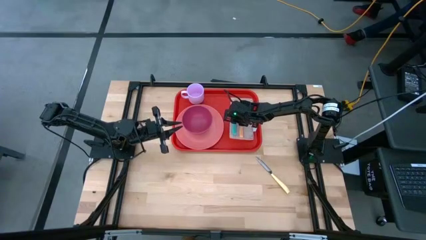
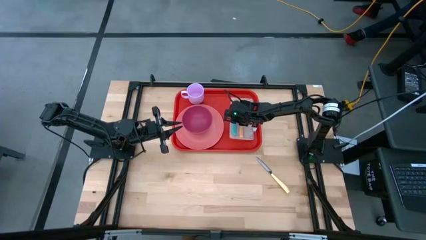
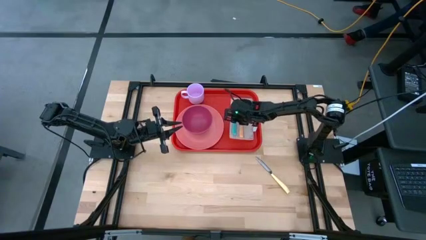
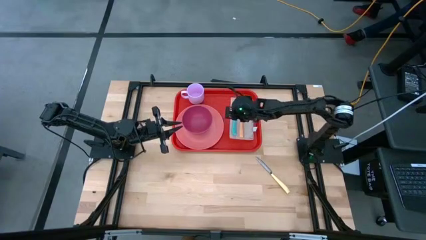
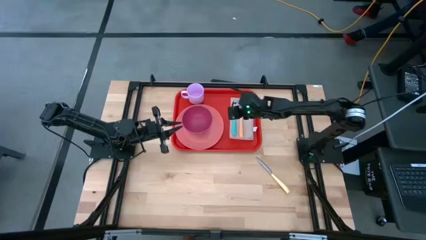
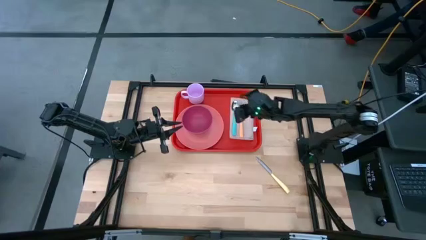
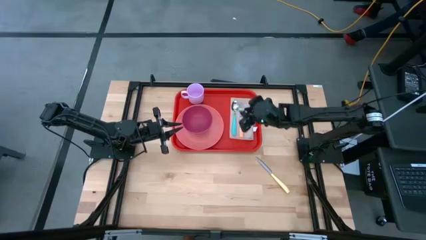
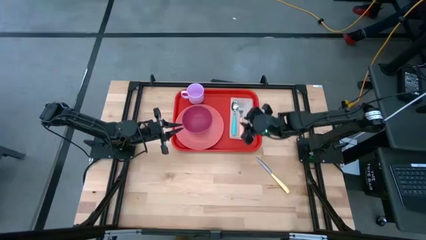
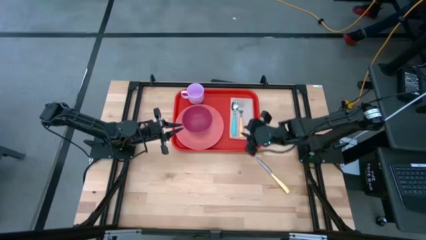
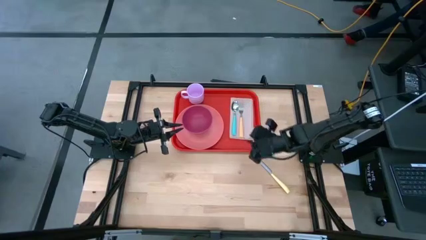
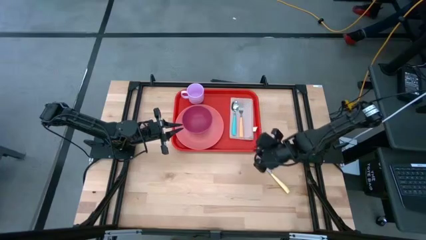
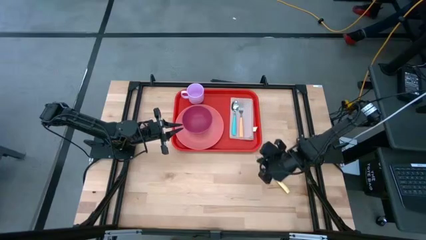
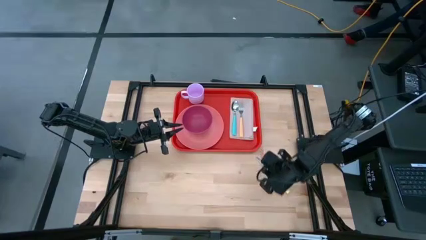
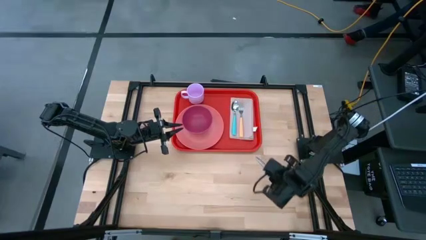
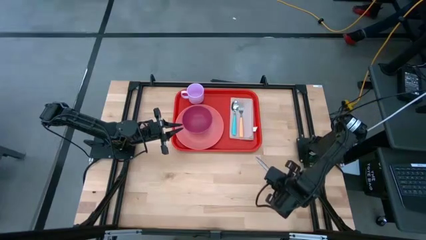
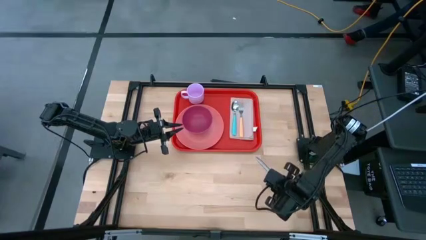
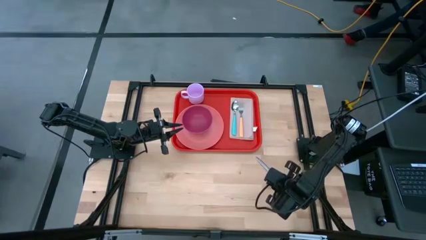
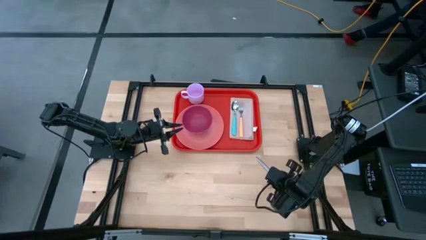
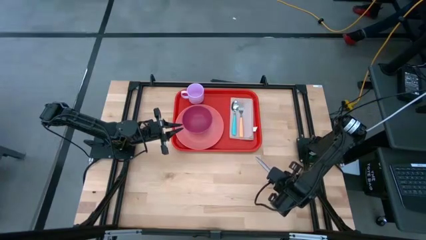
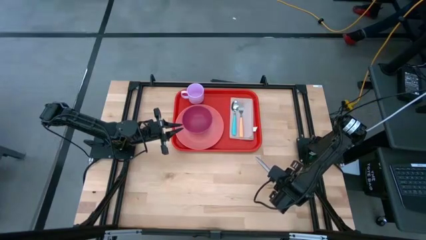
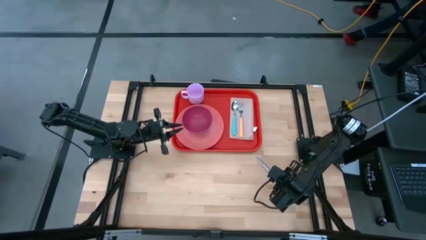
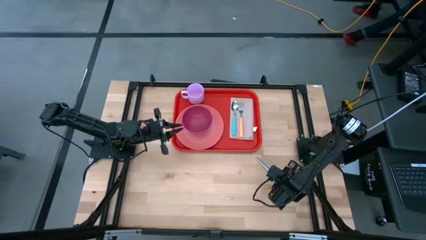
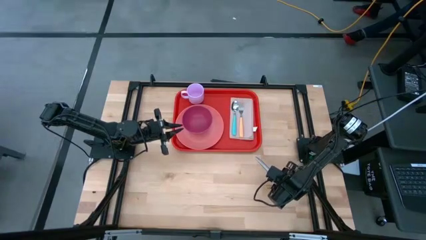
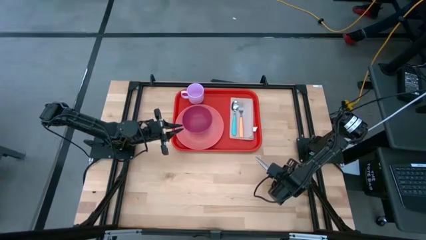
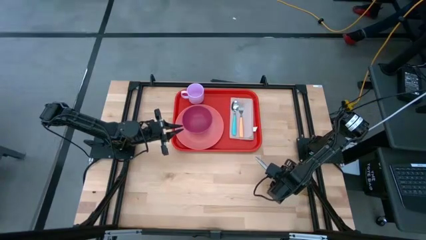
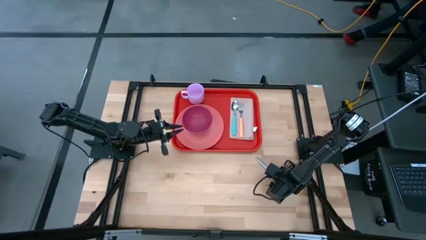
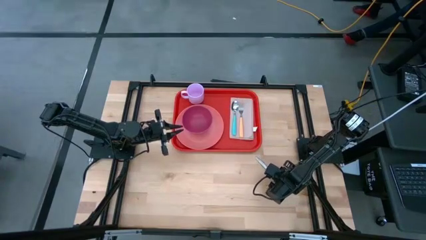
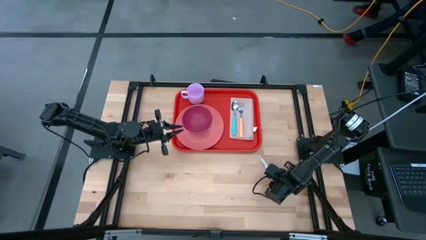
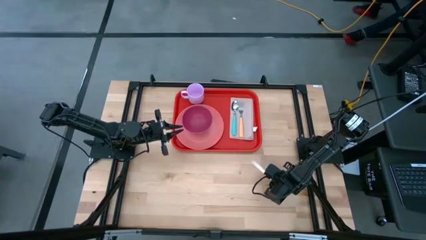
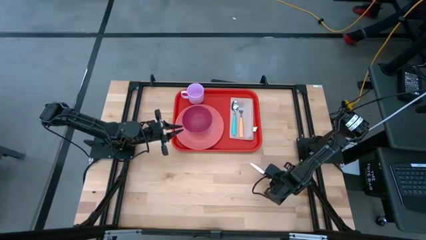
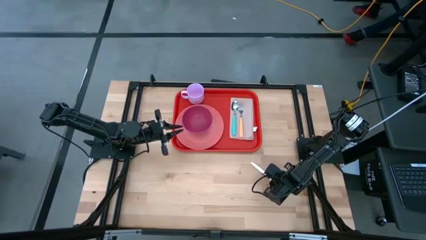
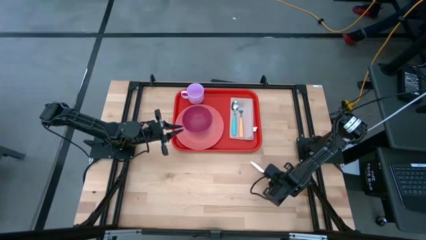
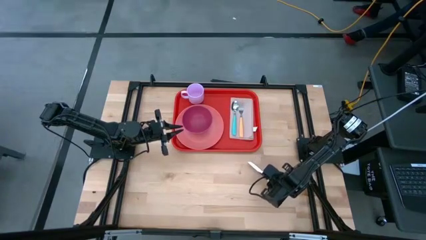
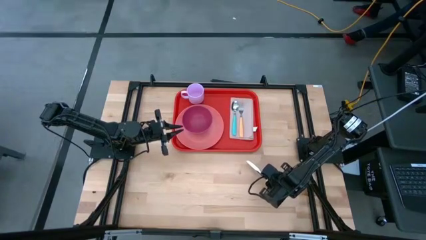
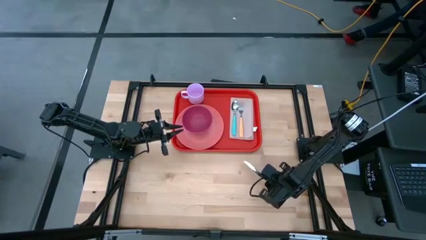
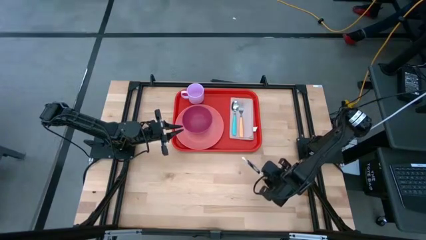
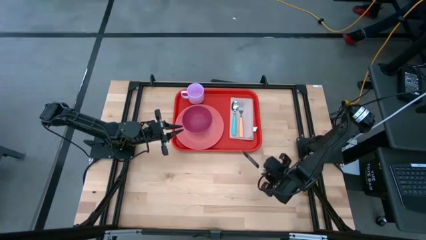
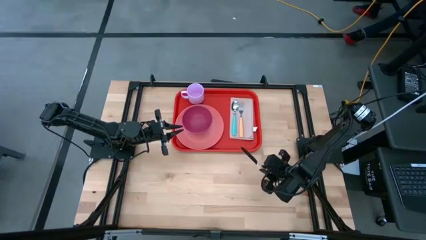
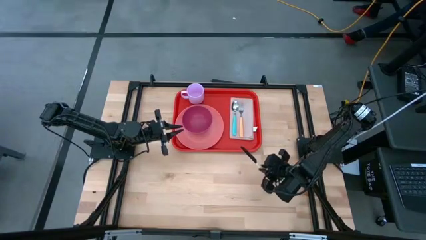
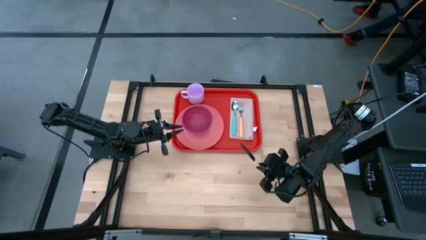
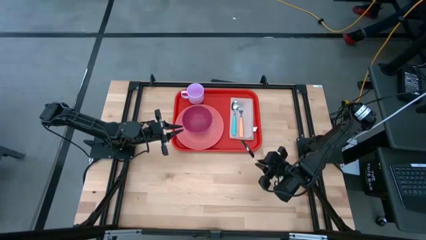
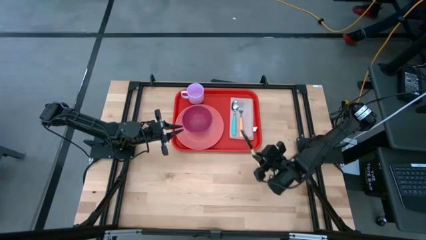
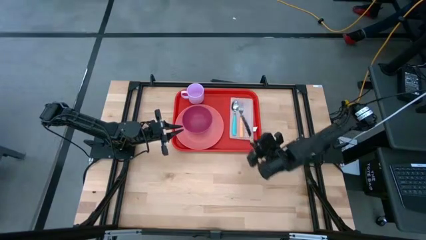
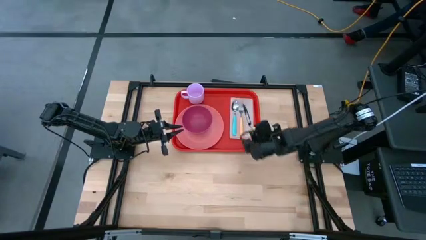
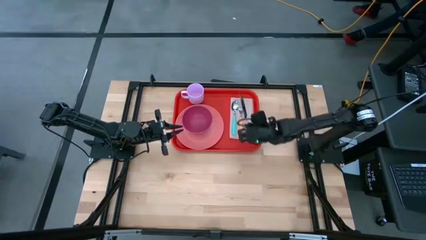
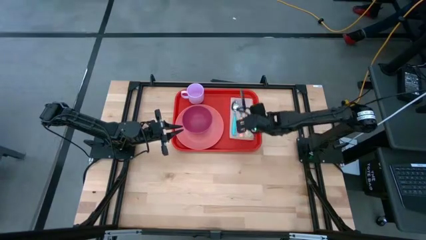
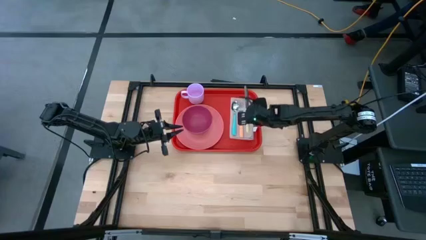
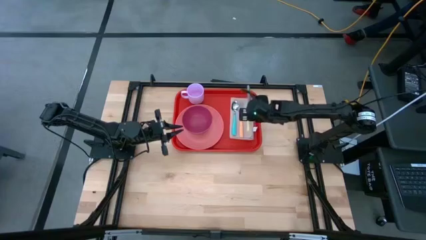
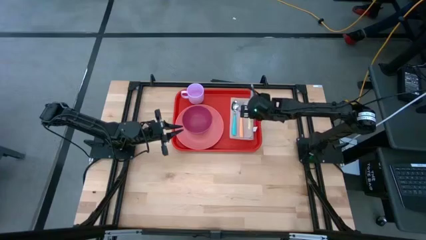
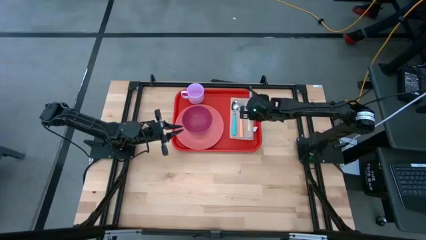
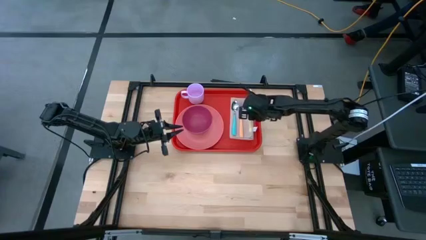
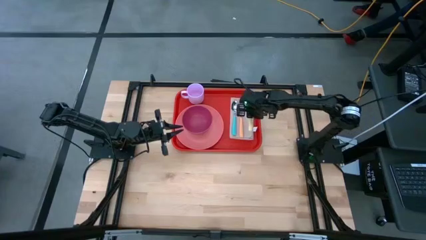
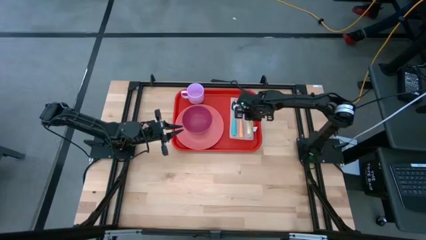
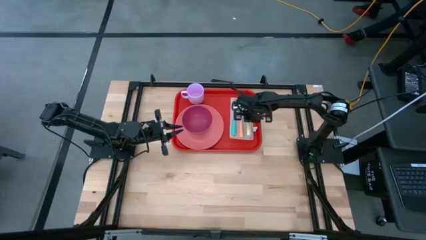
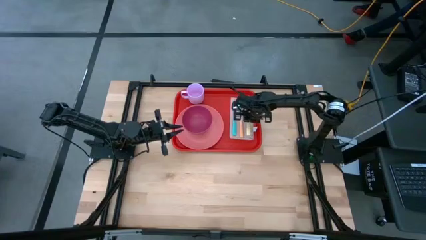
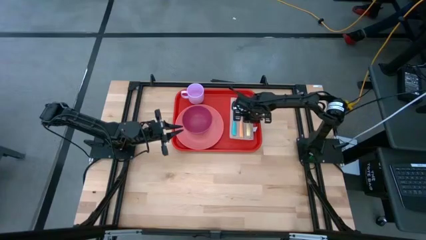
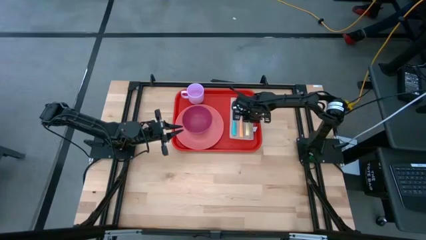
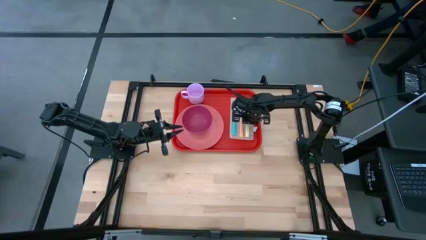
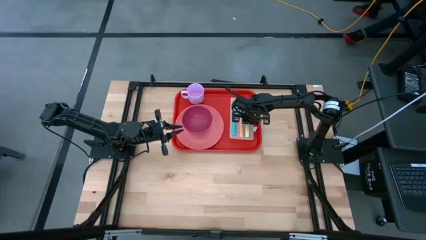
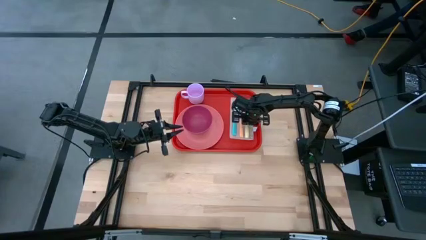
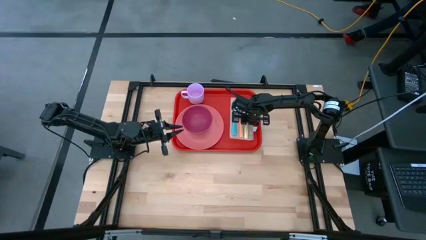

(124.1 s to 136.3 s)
Task: Set up tray
Put the yellow knife beside the orange fork on the brown napkin

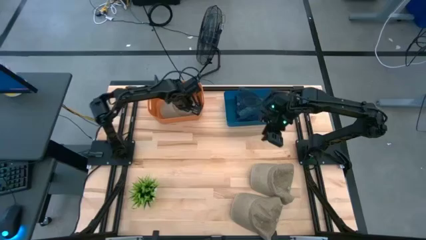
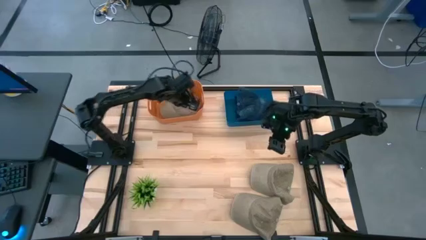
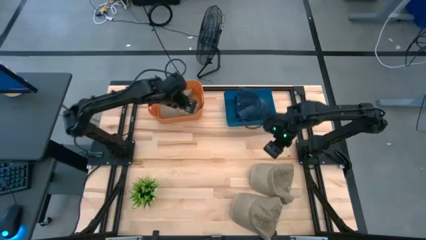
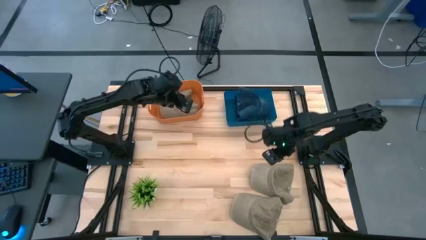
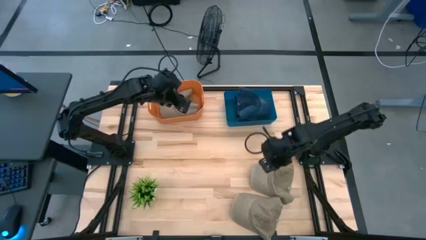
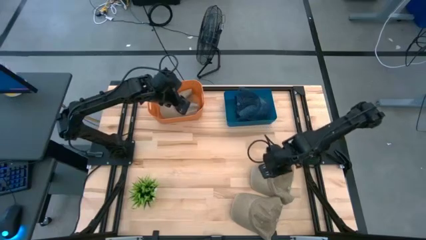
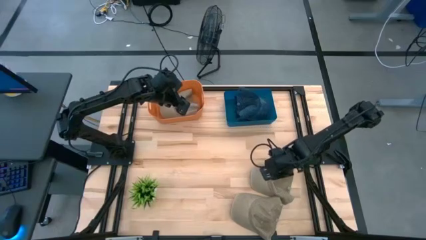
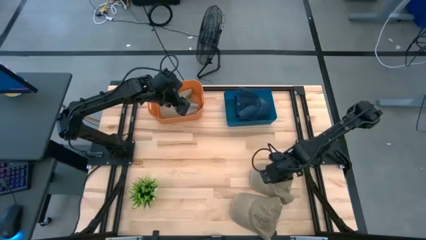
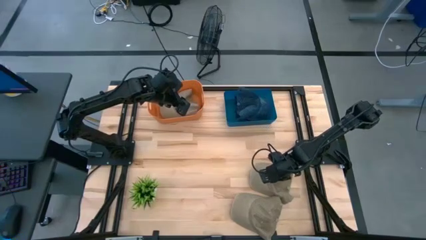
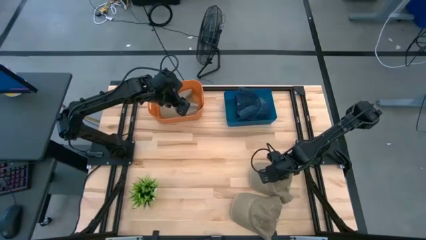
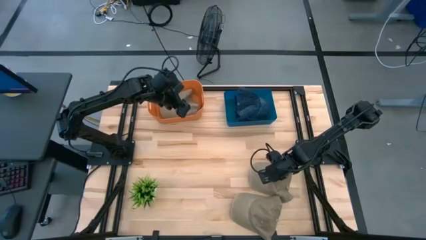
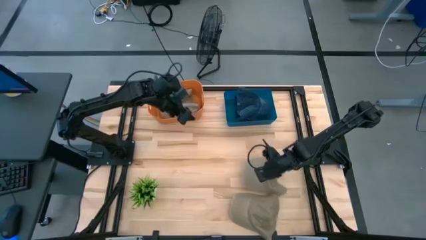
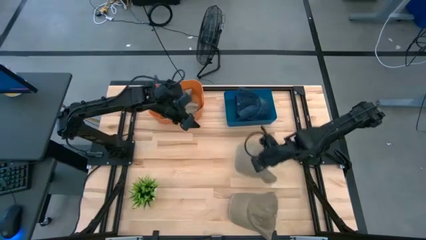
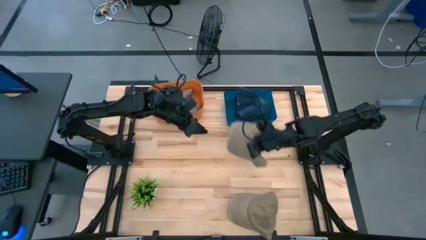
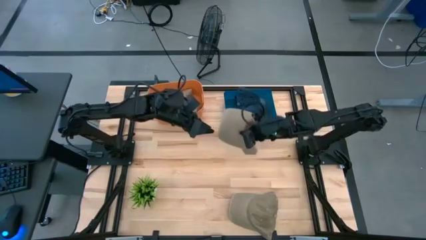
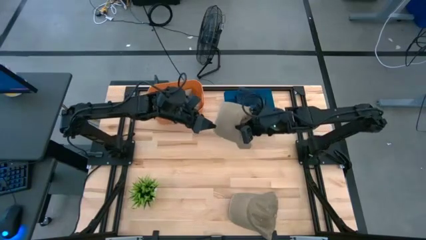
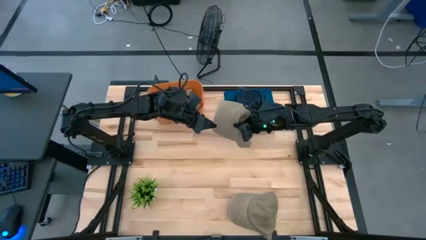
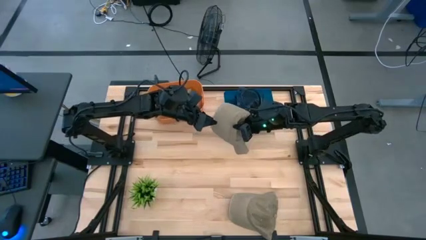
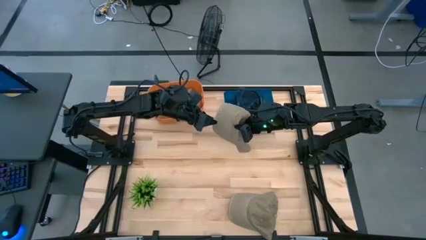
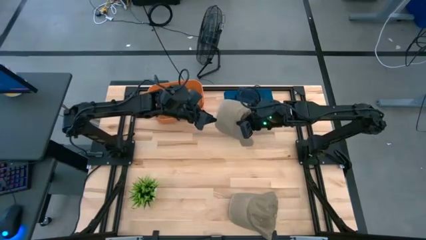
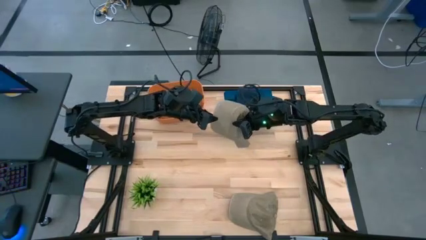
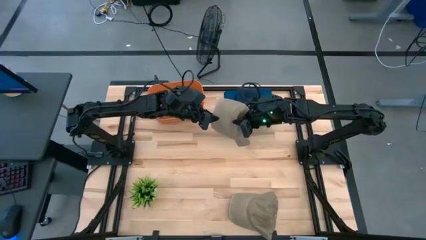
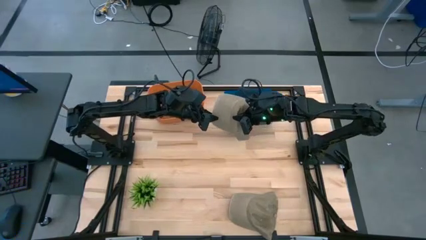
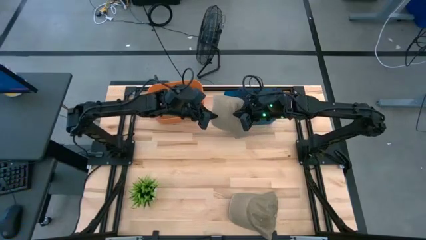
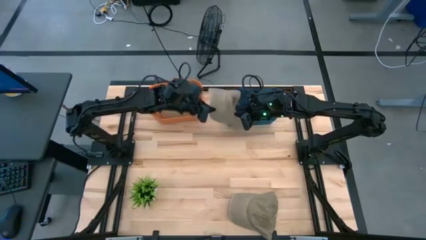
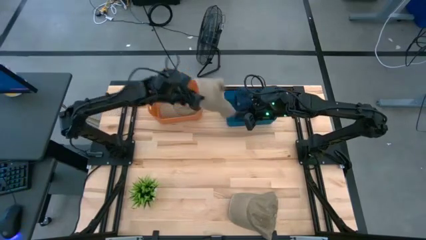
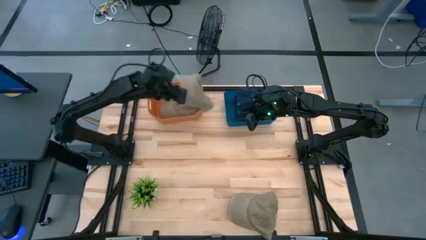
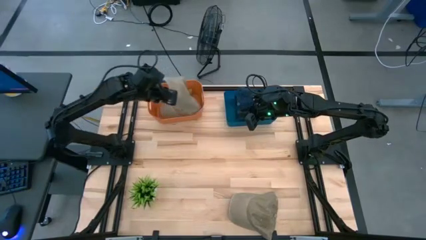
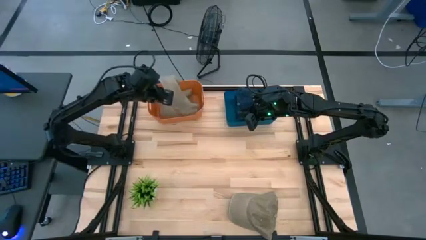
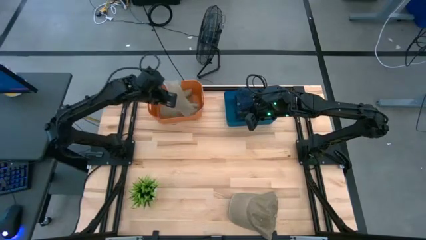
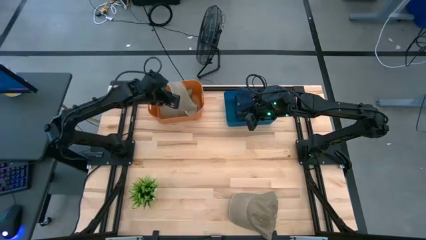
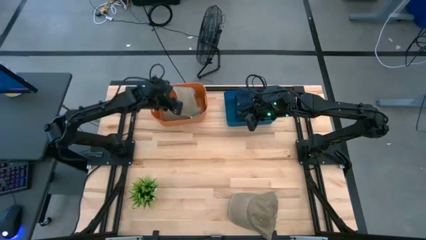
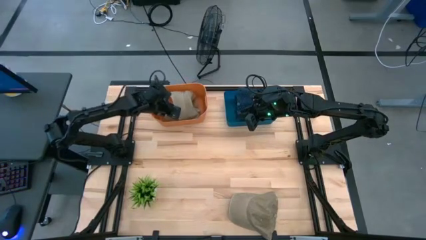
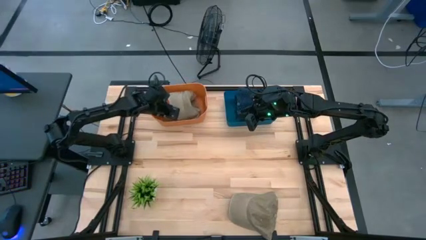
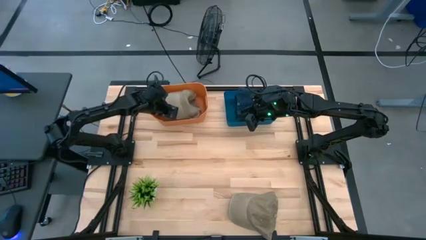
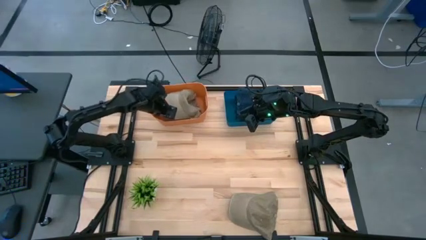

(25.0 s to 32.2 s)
Task: Pick & Place hat
Put the top brown cap into the orange bin
